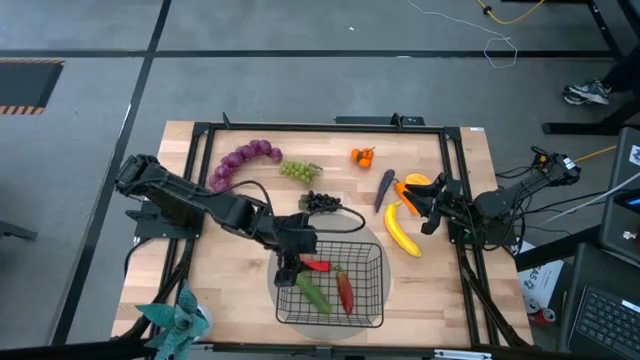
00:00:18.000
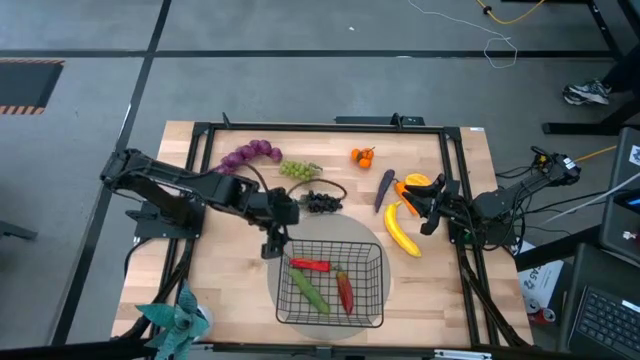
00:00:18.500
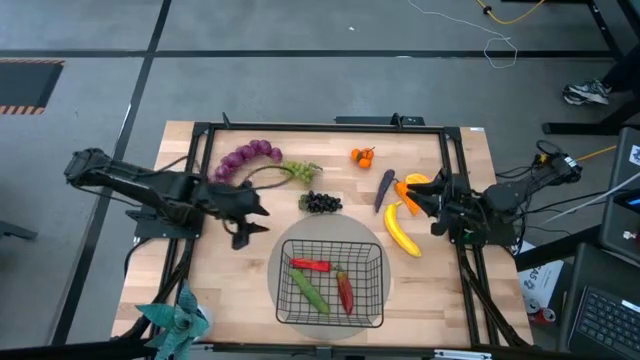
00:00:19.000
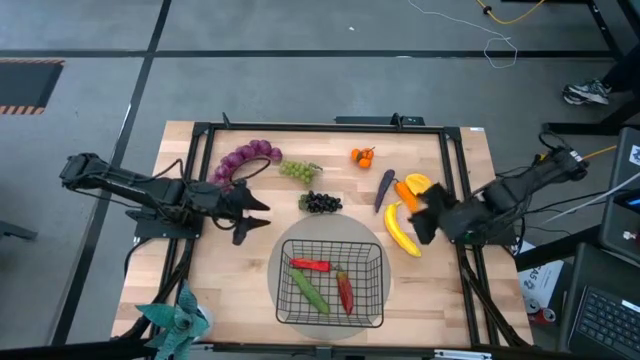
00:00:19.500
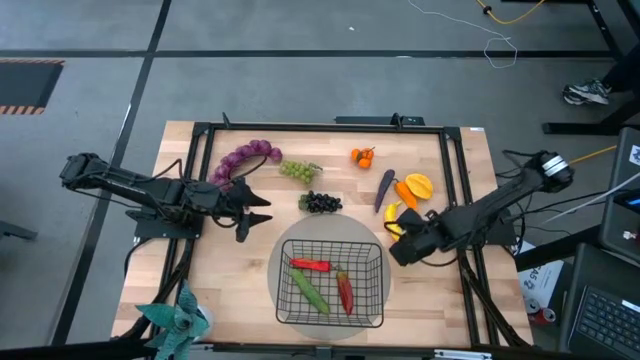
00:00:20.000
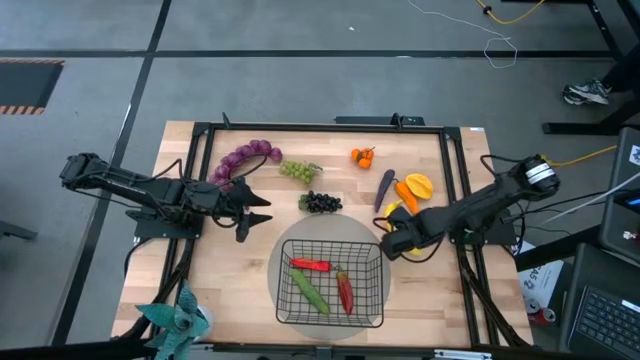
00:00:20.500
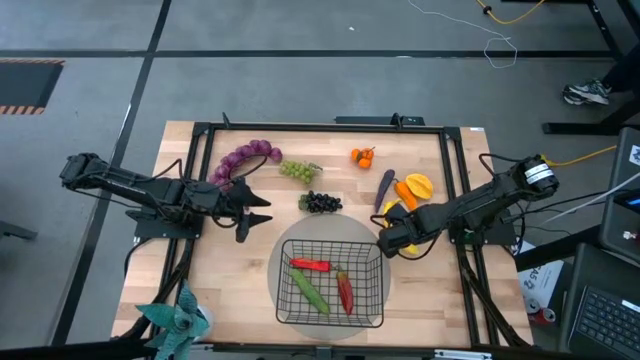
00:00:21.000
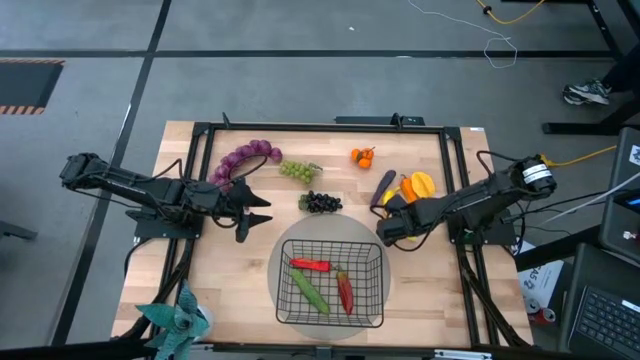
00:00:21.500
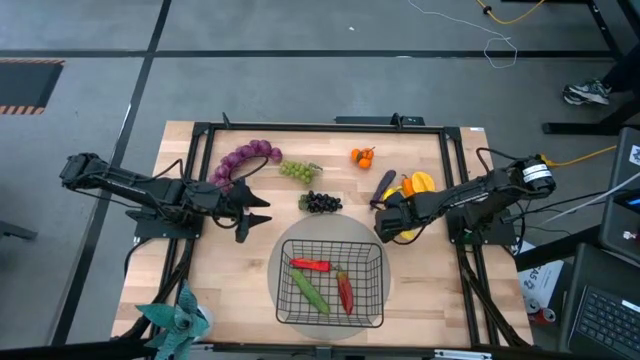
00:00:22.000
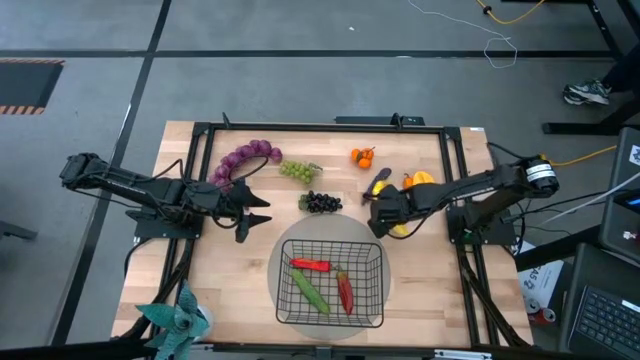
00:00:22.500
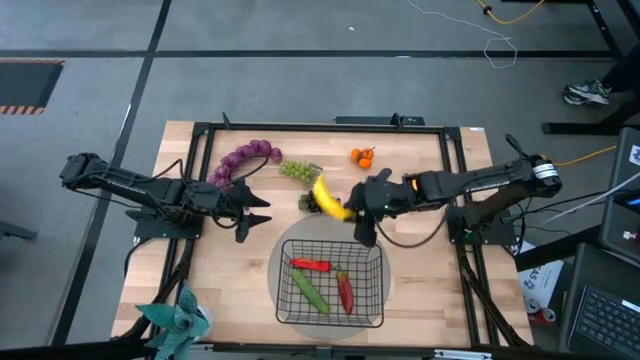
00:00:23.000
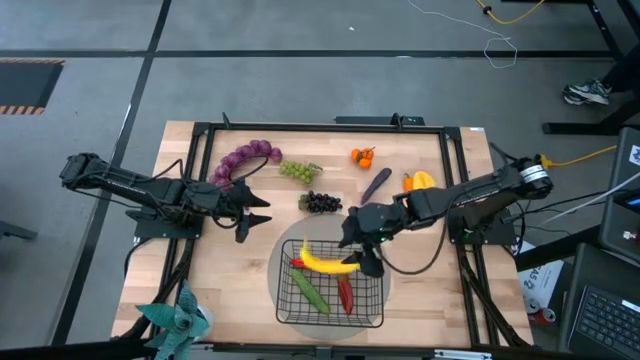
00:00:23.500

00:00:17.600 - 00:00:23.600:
Task: Build produce basket
Put the banana into the wire basket

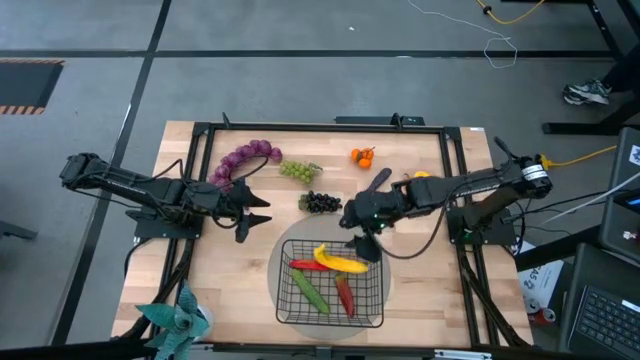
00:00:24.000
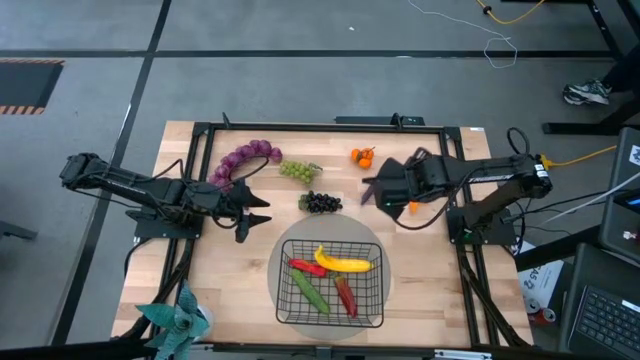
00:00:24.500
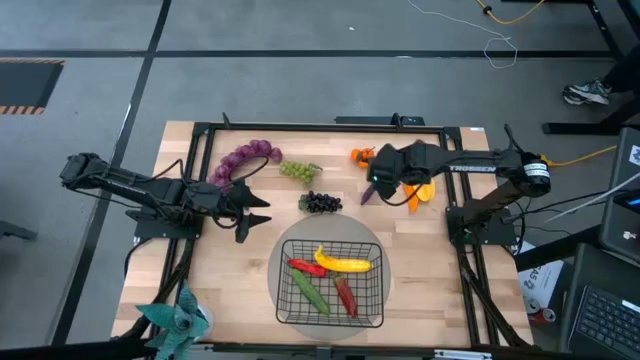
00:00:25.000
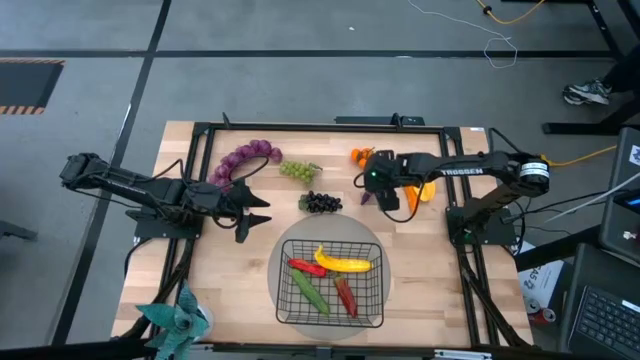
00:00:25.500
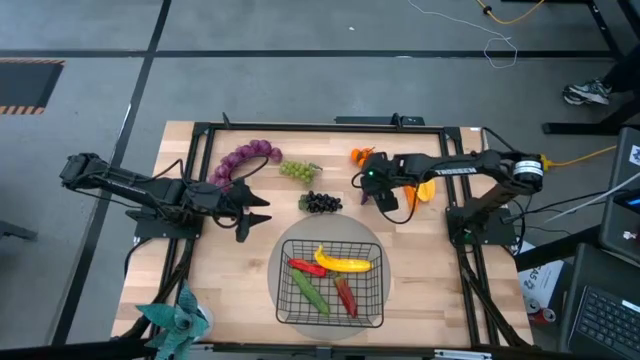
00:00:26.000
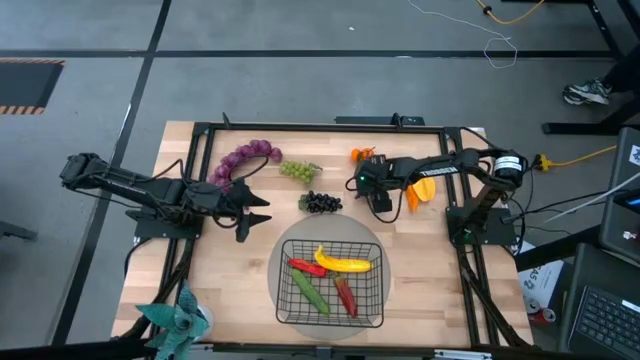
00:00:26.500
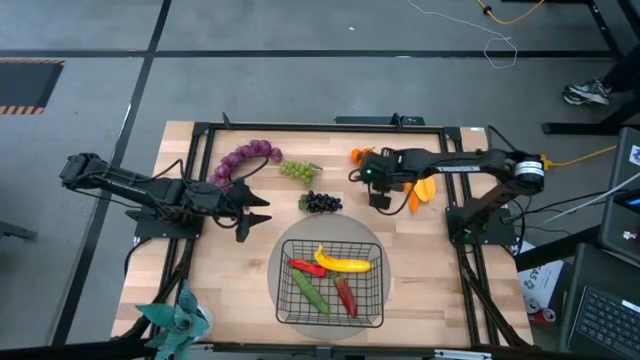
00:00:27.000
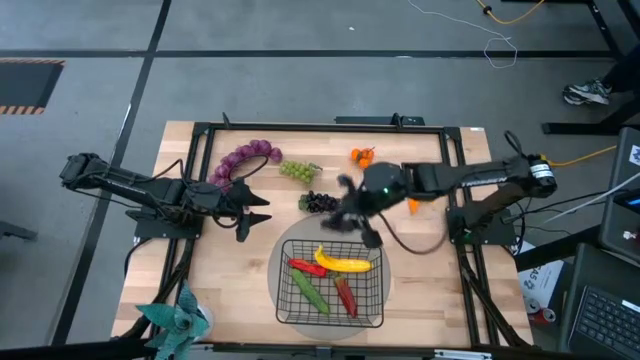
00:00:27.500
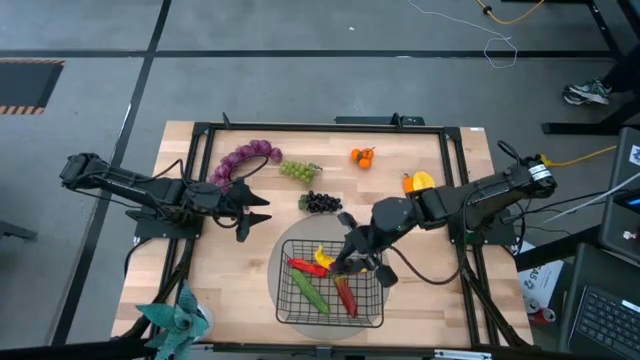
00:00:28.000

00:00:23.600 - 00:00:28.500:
Put the eggplant into the wire basket

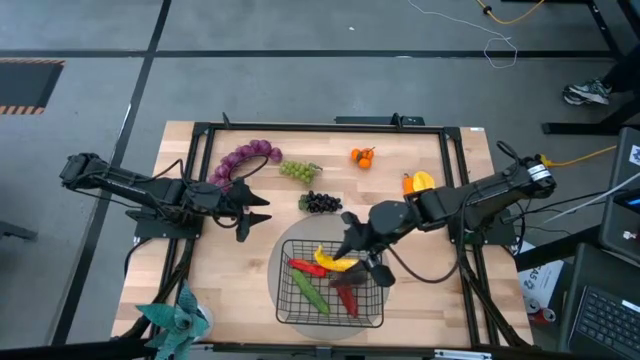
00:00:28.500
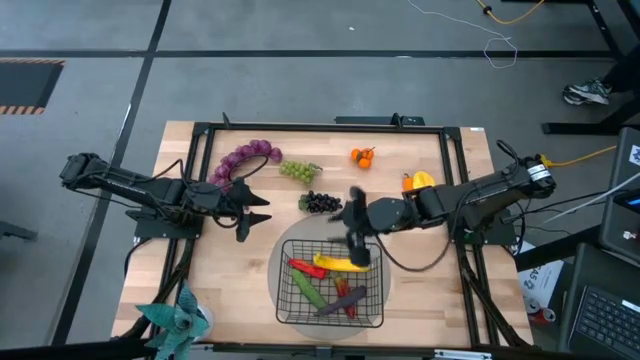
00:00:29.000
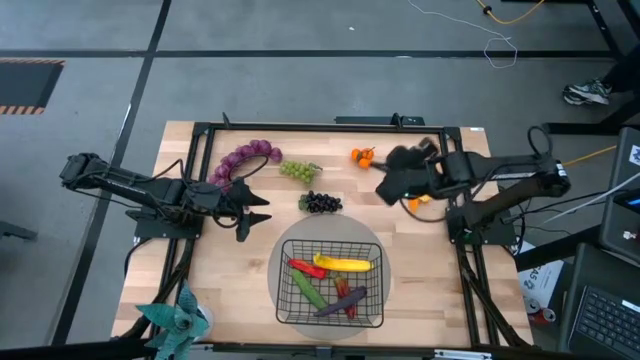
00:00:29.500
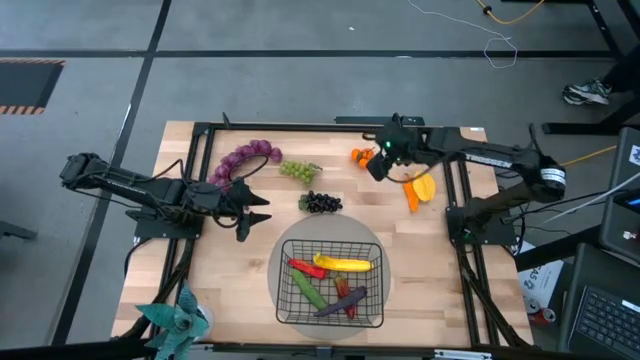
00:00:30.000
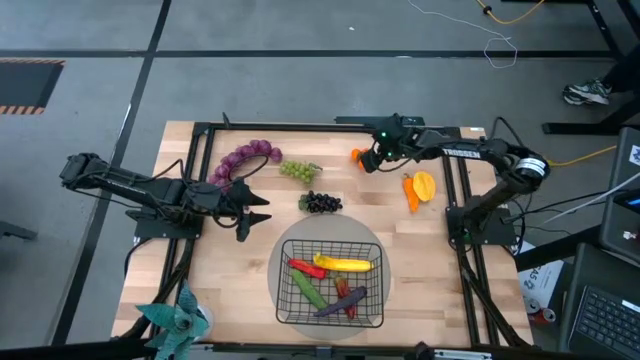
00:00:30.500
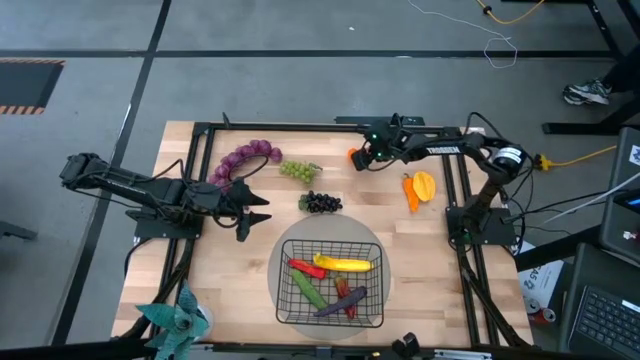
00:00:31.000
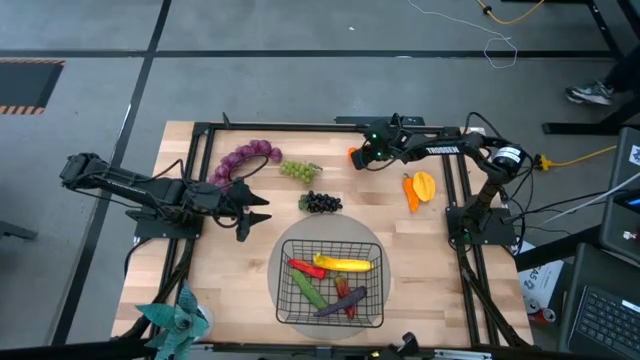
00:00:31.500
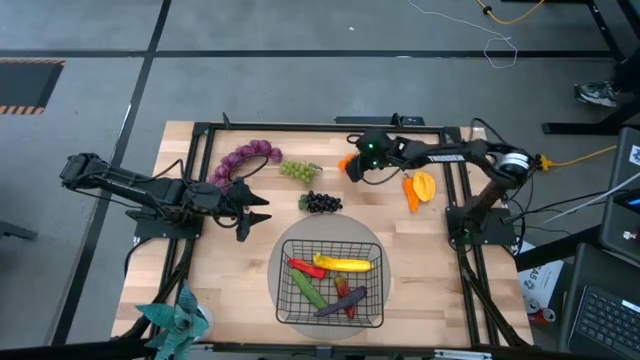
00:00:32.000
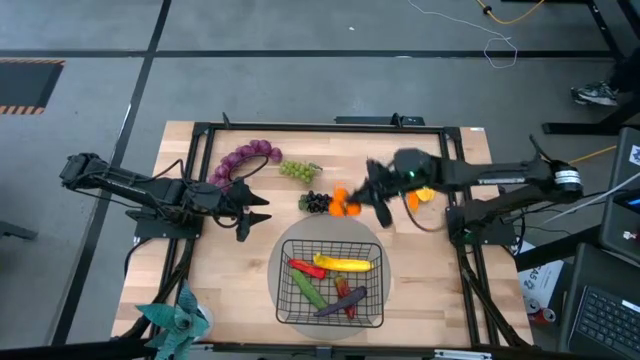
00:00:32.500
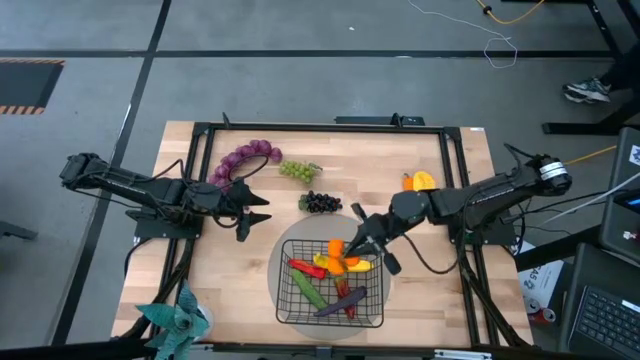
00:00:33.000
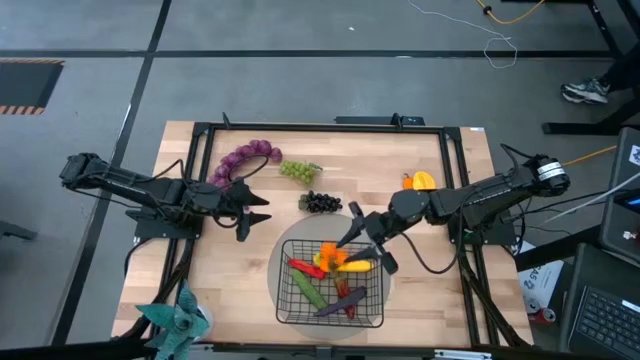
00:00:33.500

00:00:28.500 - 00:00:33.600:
Put the tangerine into the wire basket

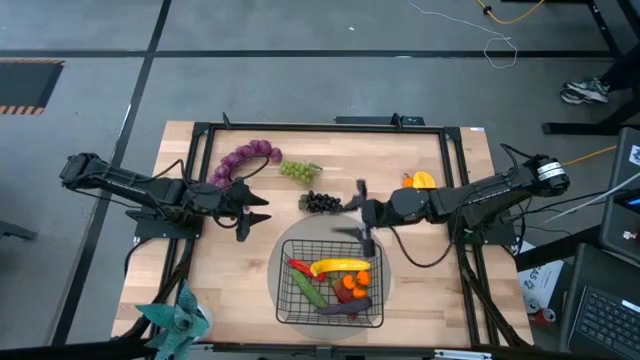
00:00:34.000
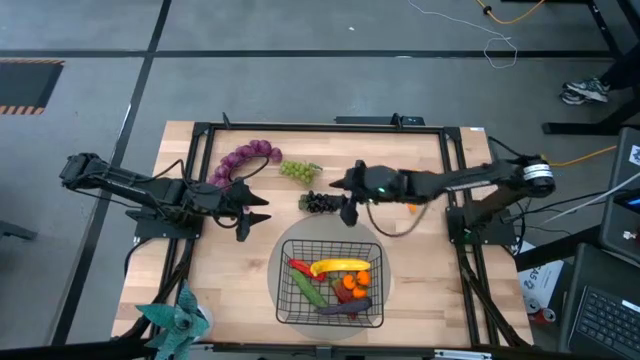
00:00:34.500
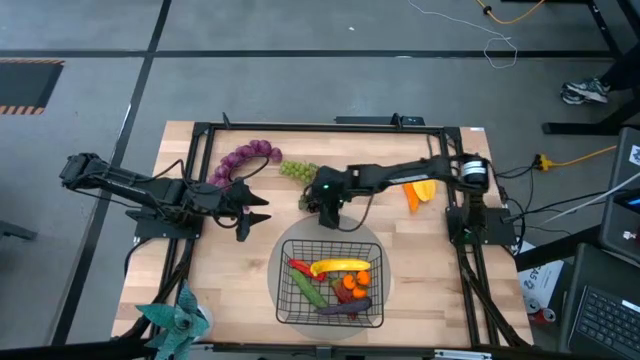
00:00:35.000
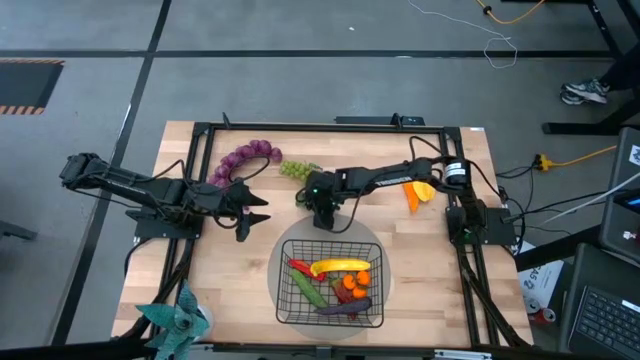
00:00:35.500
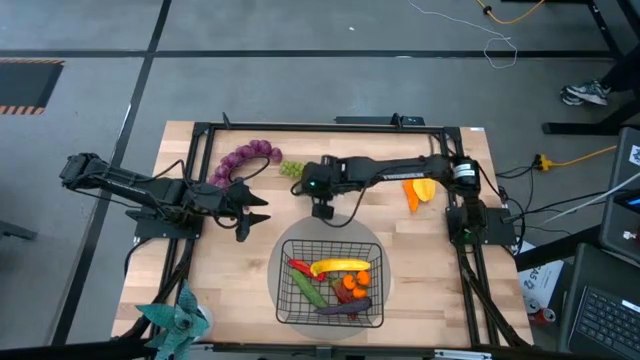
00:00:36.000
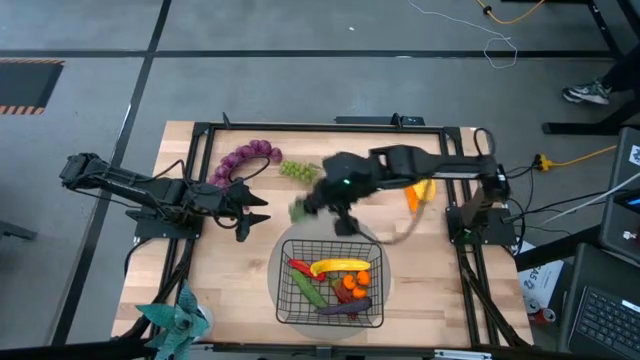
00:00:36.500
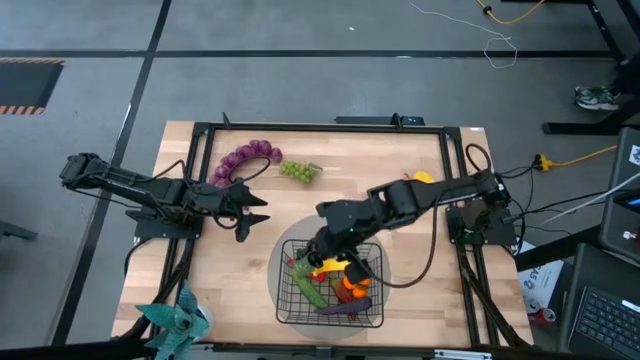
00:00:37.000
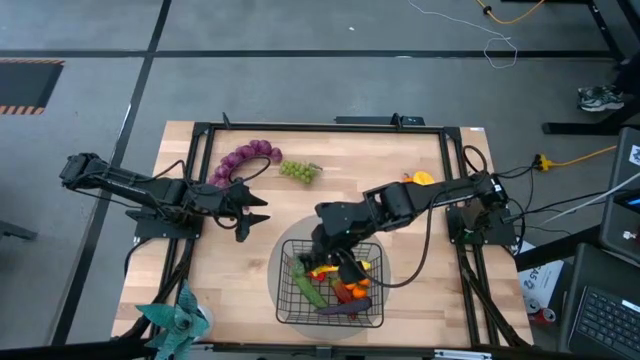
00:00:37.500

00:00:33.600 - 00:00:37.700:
Put the black grapes into the wire basket
